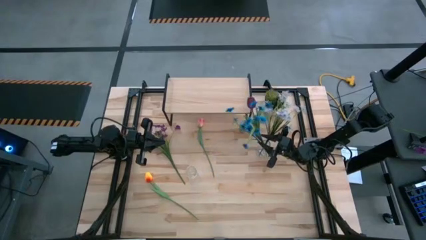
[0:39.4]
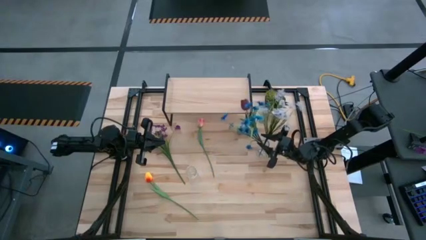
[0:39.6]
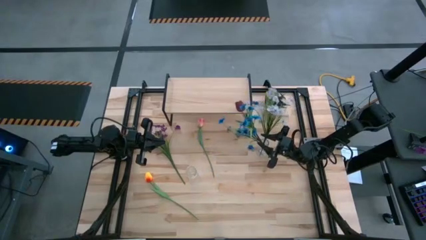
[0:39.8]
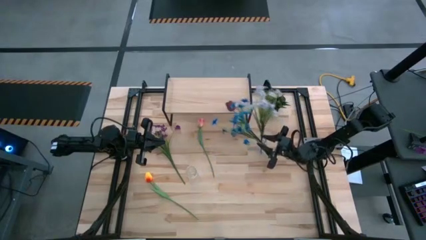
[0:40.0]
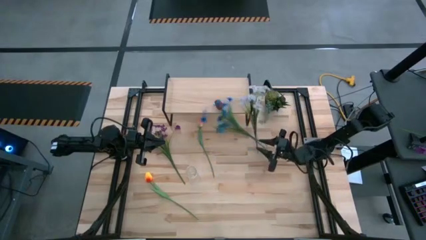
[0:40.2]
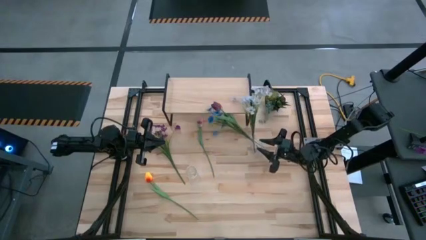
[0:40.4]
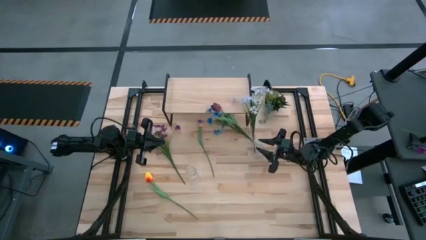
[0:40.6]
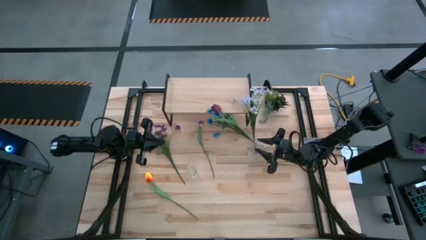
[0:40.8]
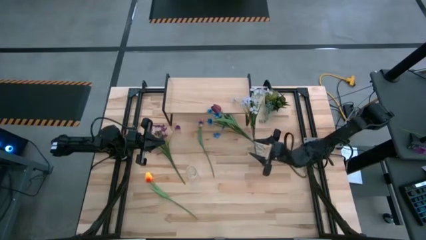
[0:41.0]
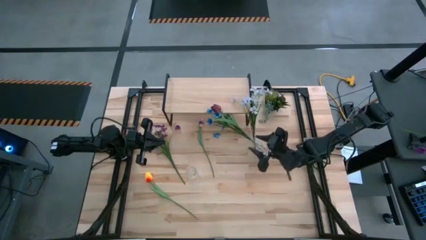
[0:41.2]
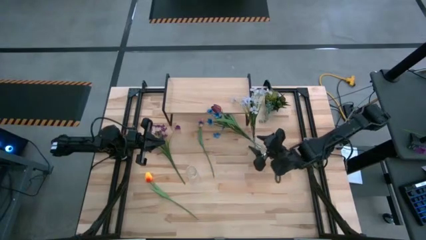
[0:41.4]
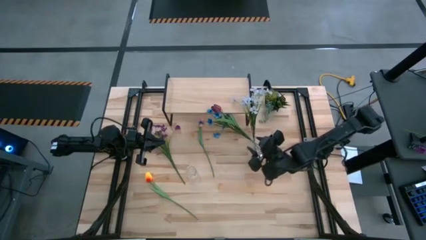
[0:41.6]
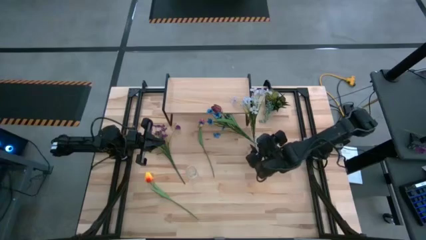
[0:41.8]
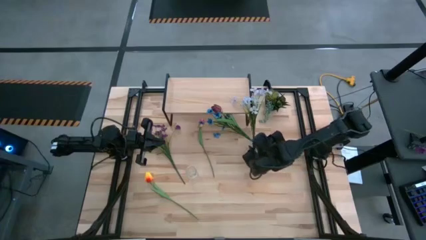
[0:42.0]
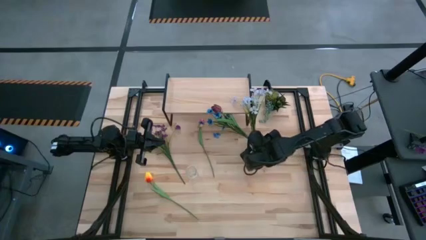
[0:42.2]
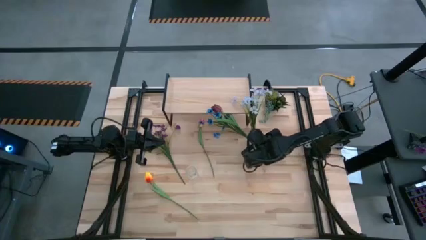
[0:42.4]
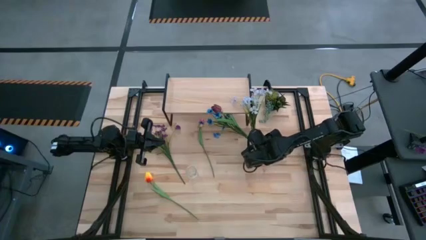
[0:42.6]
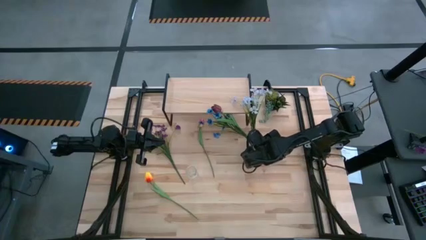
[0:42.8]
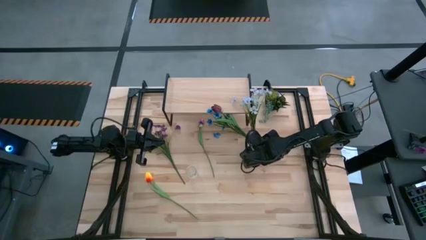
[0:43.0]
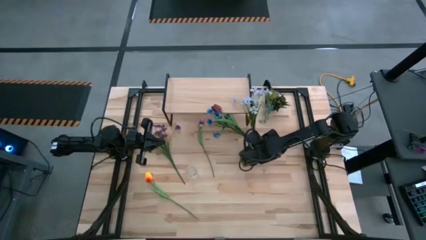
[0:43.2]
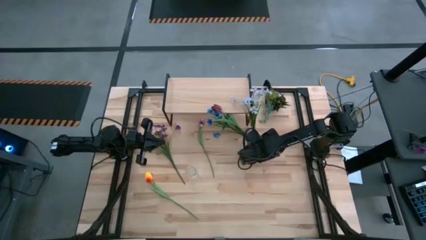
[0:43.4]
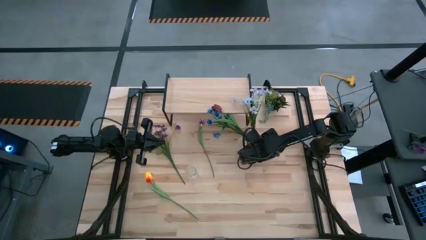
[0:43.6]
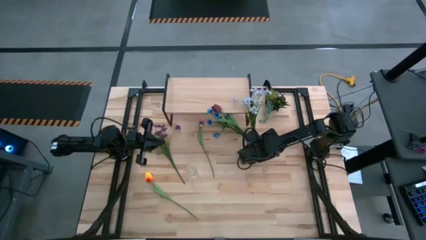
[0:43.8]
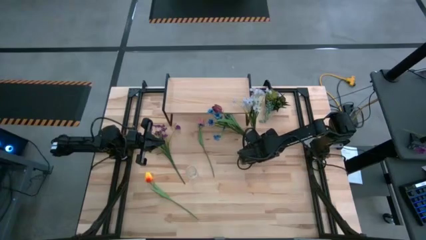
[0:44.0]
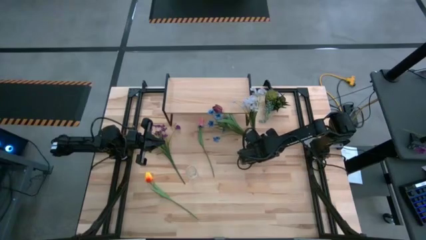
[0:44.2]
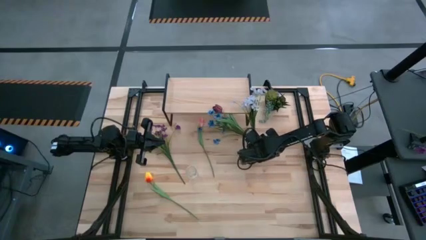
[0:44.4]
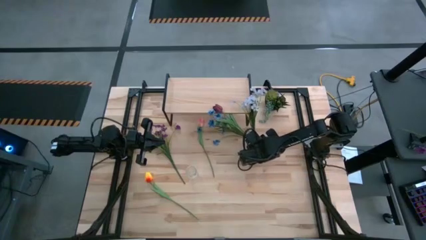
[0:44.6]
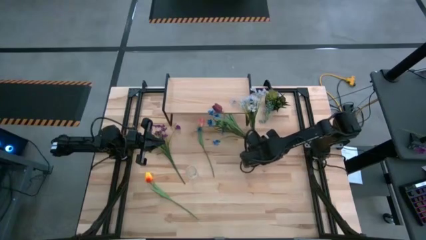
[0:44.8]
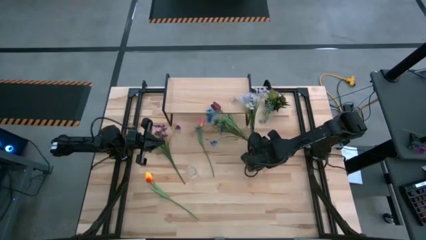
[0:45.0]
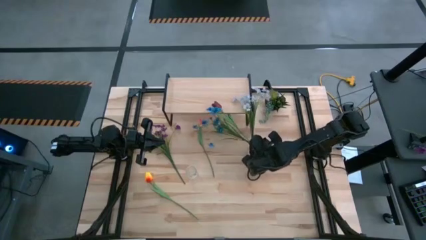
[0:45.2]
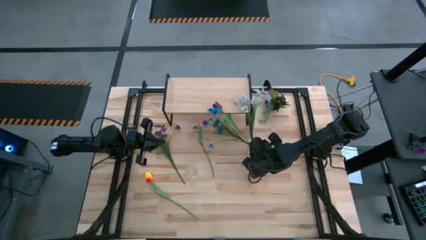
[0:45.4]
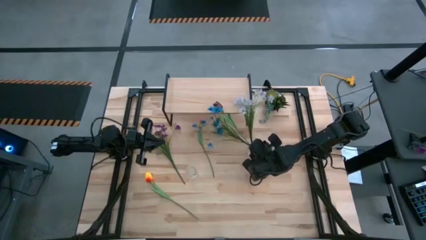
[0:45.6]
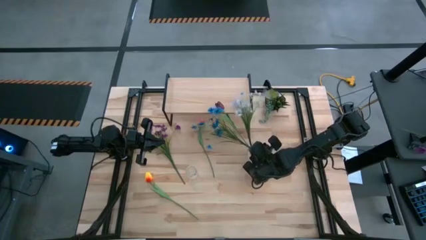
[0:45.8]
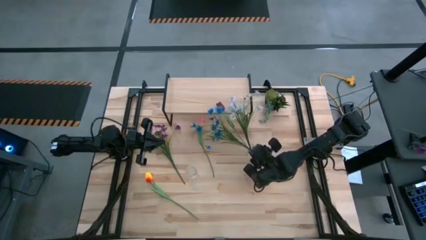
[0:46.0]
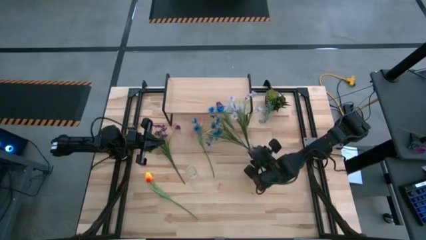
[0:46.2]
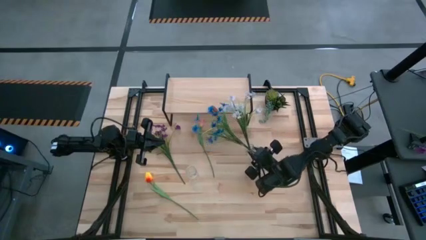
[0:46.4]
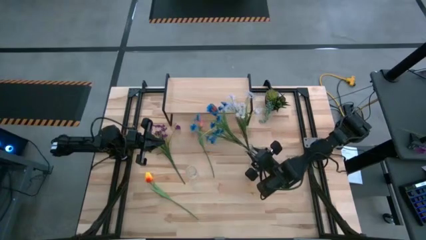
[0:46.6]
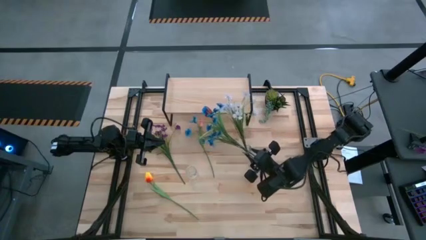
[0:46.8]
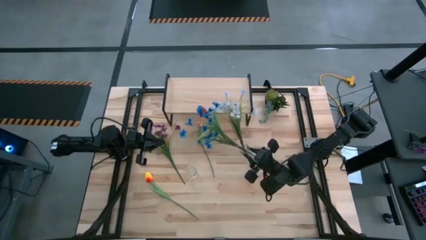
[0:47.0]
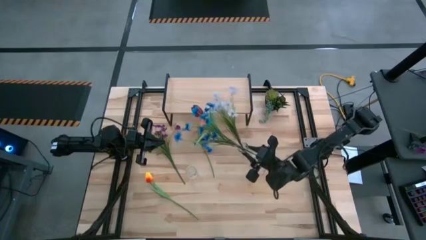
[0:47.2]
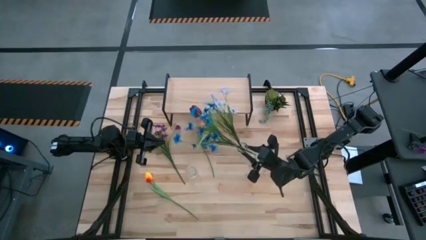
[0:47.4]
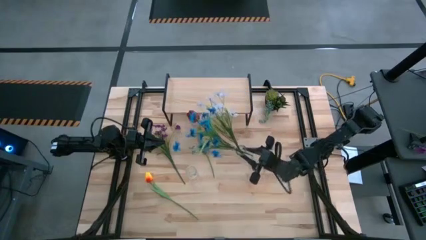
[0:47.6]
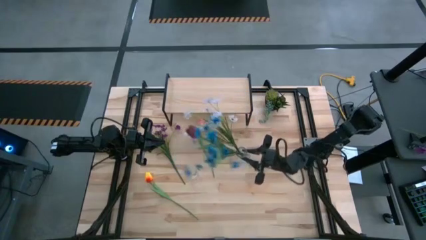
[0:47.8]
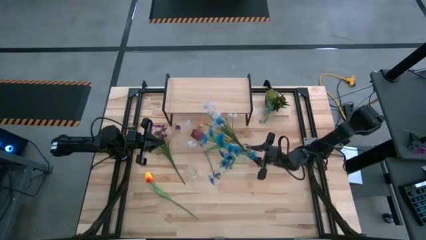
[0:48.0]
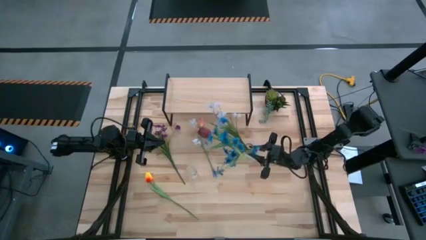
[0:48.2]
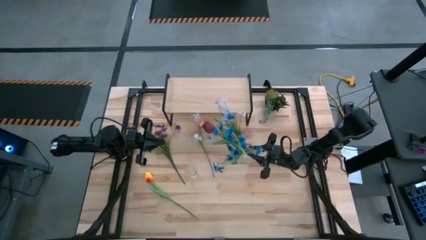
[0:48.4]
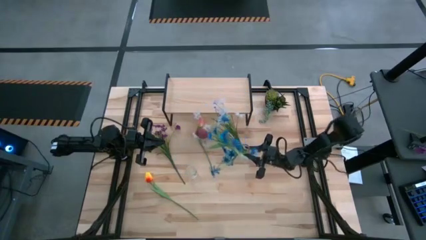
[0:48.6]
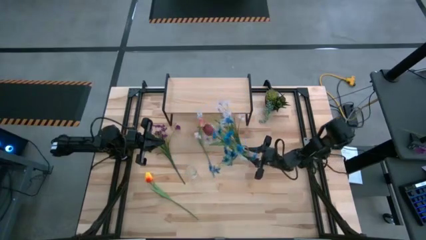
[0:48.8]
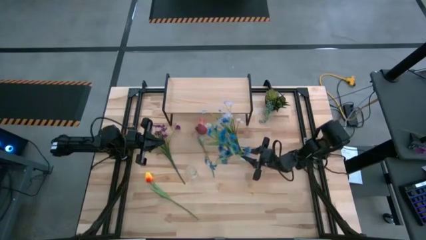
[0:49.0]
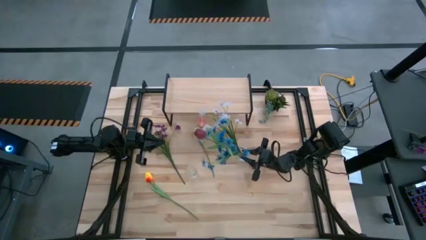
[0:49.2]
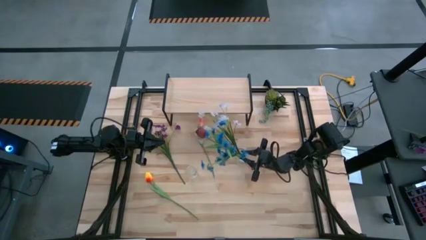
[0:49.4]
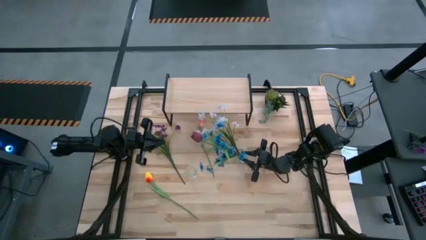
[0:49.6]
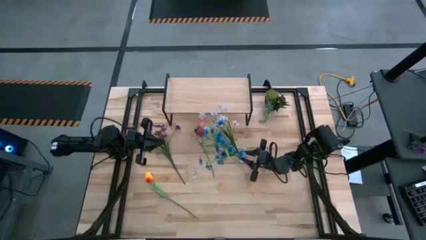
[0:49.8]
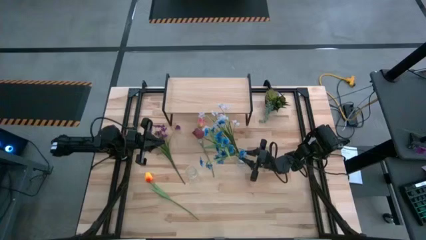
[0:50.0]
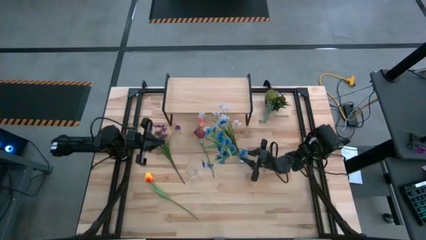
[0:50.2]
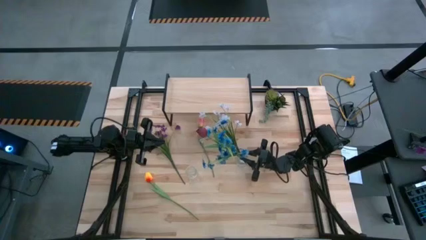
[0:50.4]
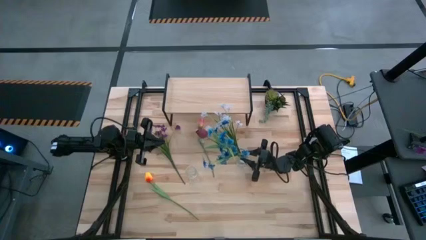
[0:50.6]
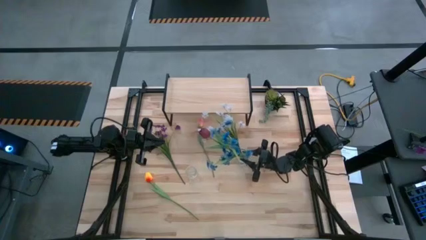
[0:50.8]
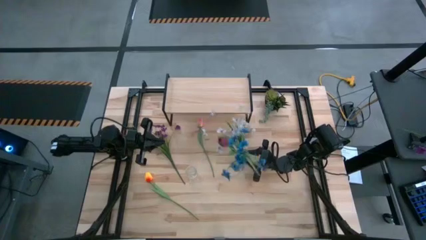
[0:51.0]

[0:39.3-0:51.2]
Task: Pick and place flowers into a vace then onto a shelf
Adjust the right transparent crystal vase
